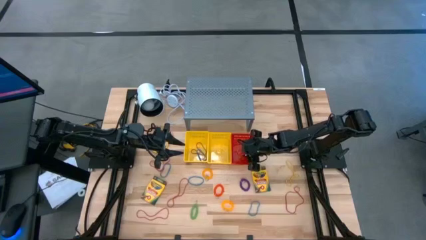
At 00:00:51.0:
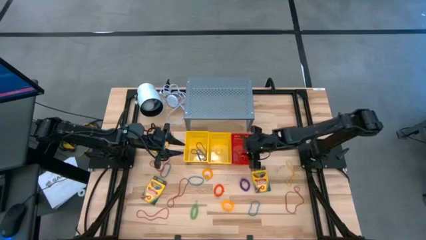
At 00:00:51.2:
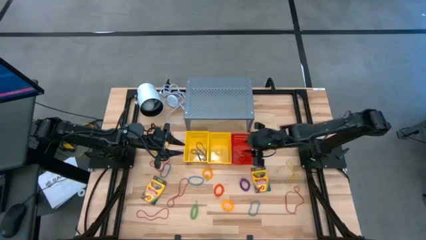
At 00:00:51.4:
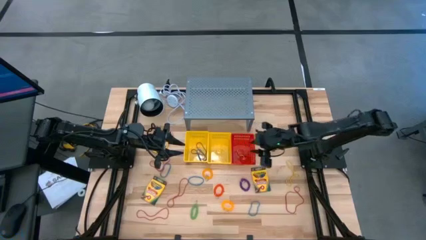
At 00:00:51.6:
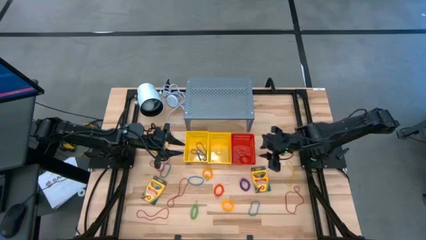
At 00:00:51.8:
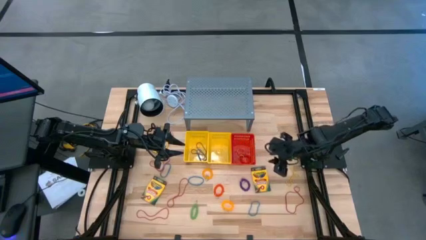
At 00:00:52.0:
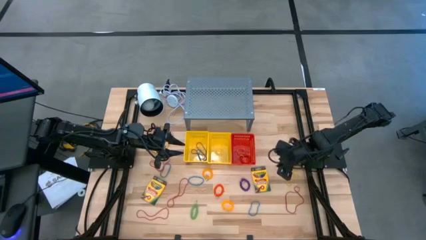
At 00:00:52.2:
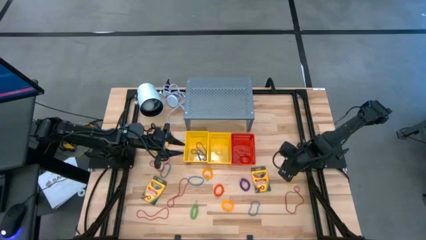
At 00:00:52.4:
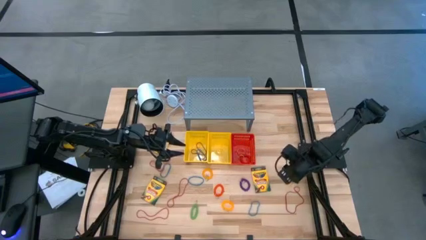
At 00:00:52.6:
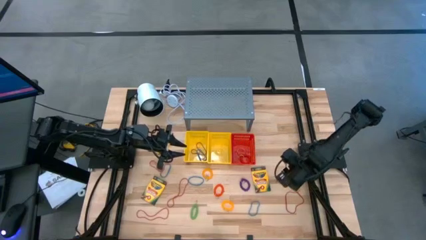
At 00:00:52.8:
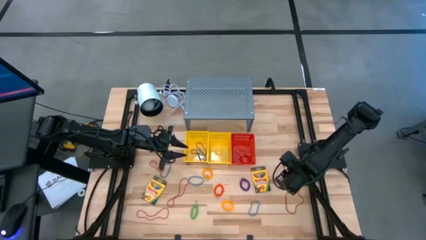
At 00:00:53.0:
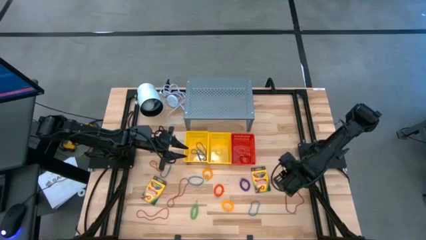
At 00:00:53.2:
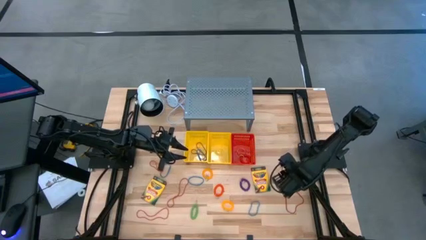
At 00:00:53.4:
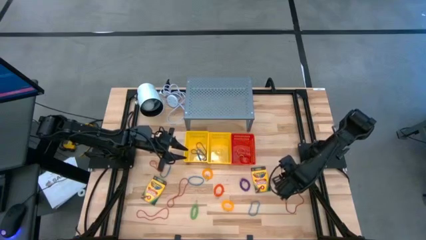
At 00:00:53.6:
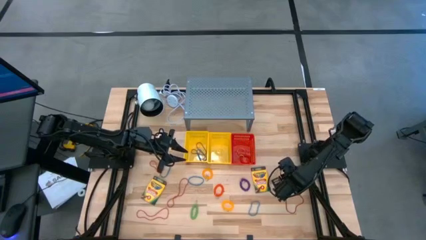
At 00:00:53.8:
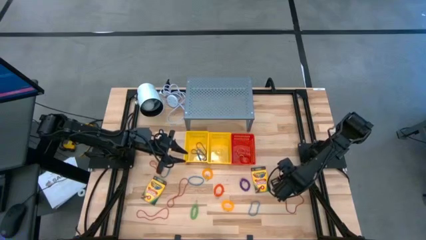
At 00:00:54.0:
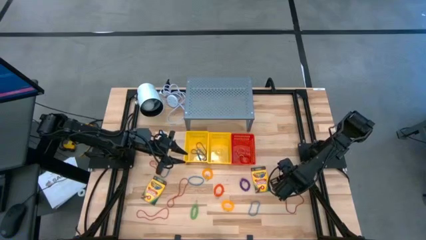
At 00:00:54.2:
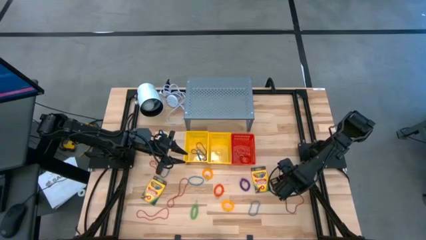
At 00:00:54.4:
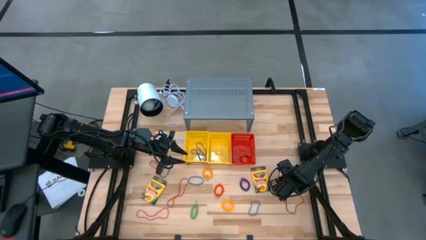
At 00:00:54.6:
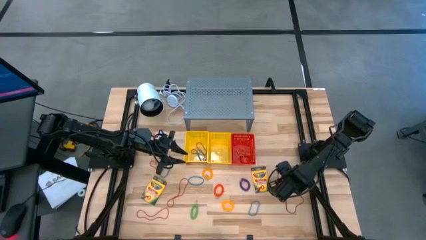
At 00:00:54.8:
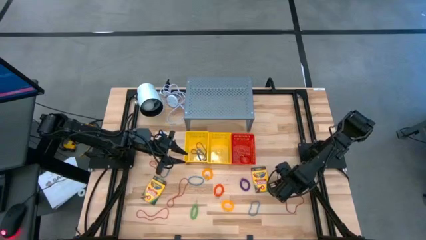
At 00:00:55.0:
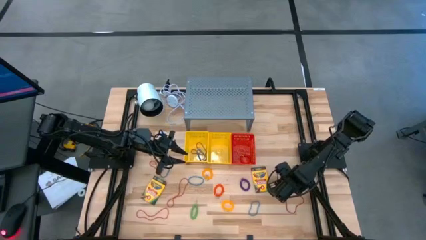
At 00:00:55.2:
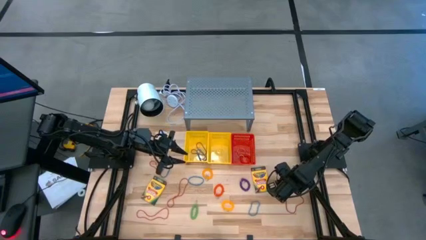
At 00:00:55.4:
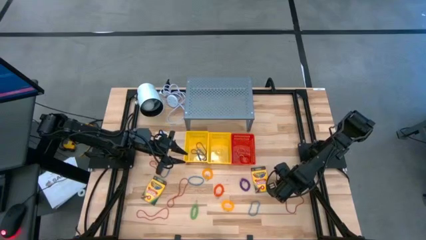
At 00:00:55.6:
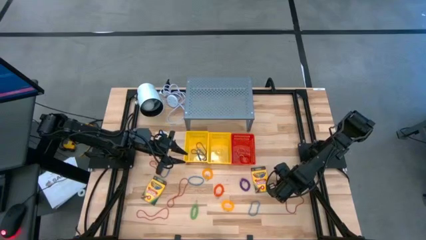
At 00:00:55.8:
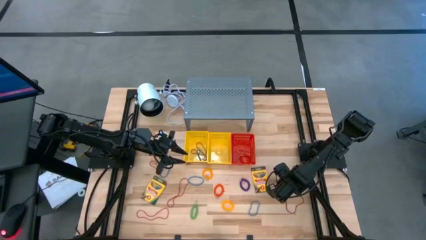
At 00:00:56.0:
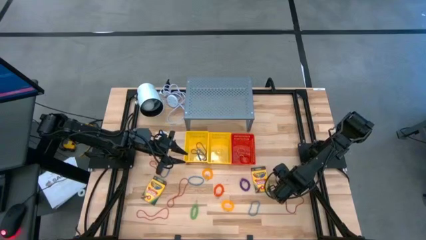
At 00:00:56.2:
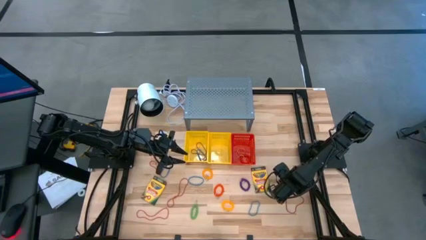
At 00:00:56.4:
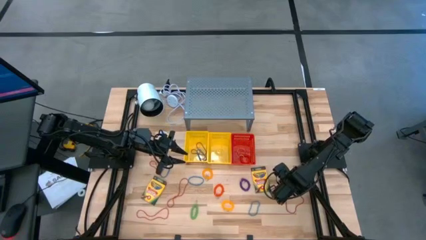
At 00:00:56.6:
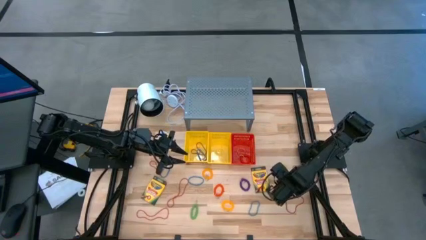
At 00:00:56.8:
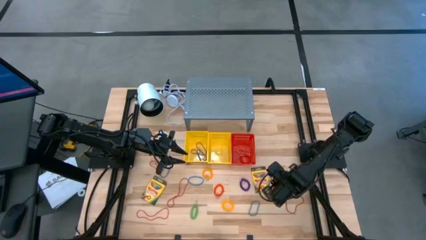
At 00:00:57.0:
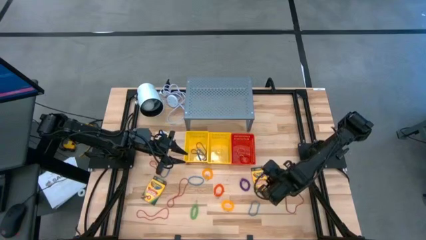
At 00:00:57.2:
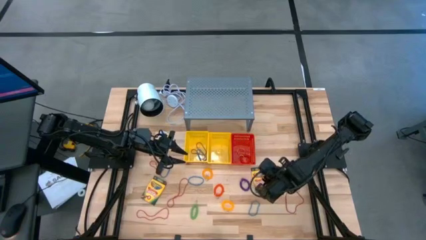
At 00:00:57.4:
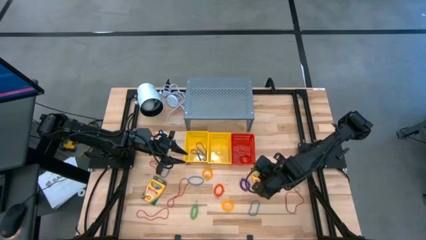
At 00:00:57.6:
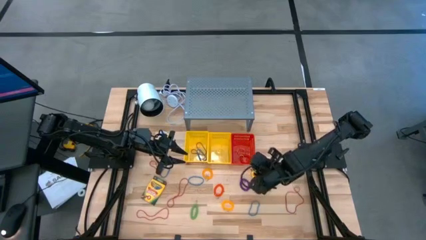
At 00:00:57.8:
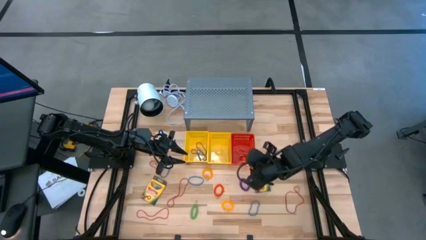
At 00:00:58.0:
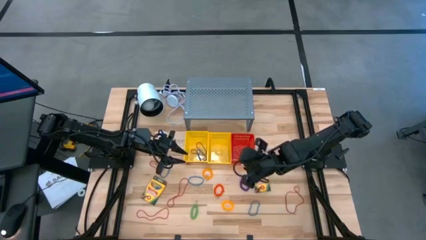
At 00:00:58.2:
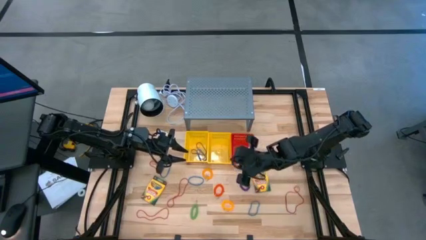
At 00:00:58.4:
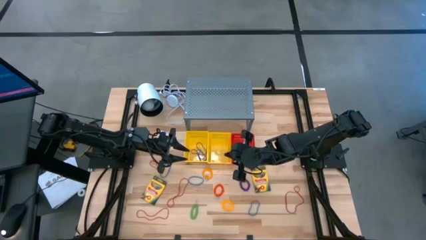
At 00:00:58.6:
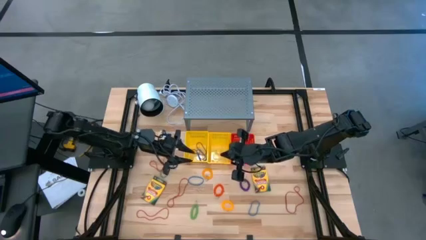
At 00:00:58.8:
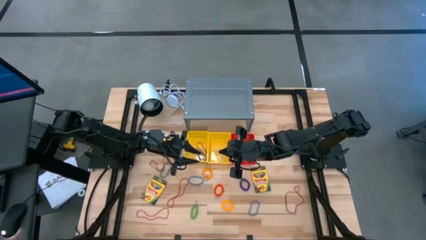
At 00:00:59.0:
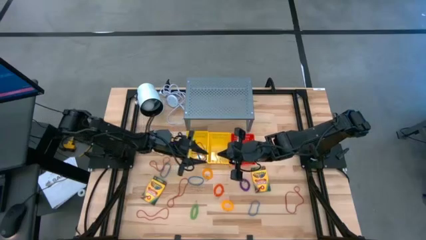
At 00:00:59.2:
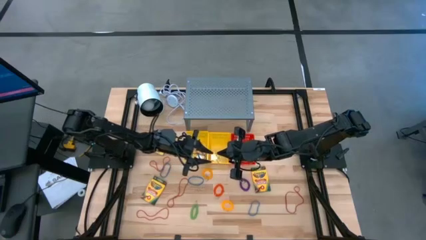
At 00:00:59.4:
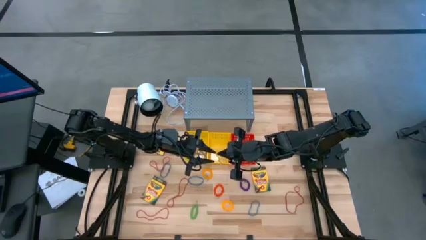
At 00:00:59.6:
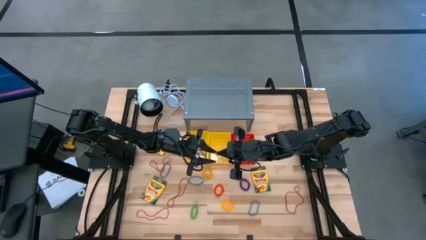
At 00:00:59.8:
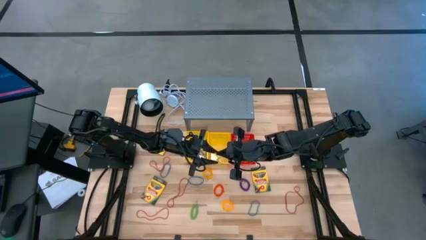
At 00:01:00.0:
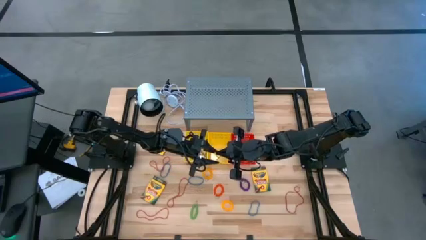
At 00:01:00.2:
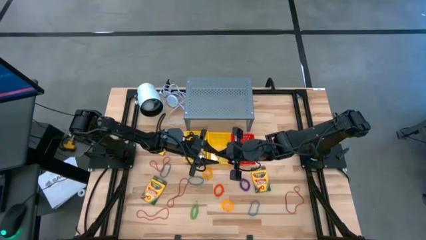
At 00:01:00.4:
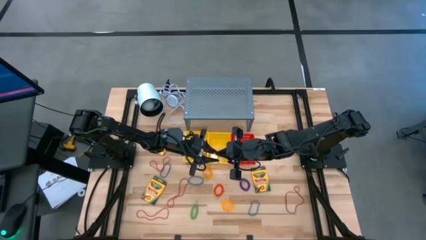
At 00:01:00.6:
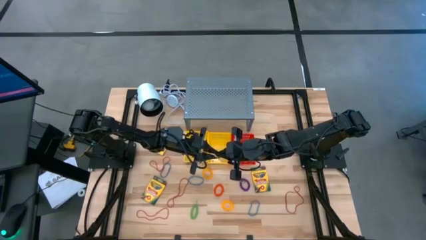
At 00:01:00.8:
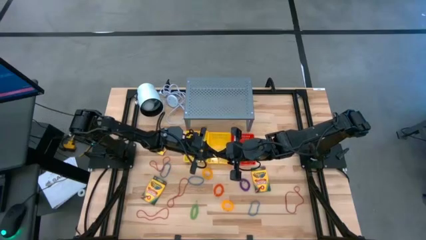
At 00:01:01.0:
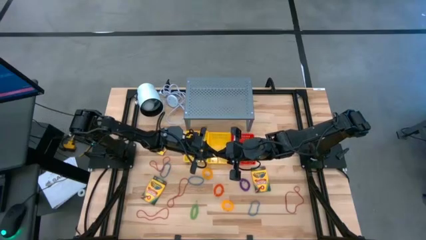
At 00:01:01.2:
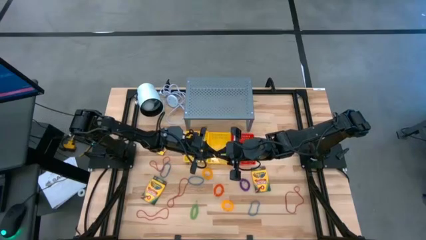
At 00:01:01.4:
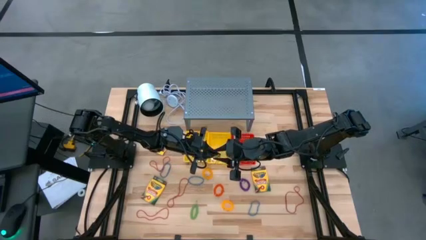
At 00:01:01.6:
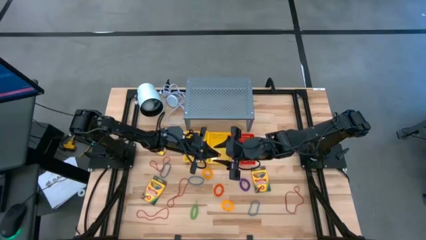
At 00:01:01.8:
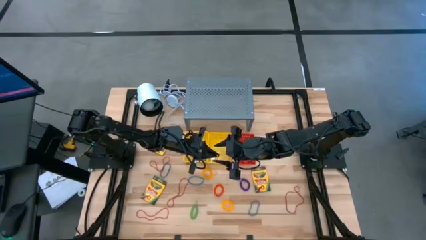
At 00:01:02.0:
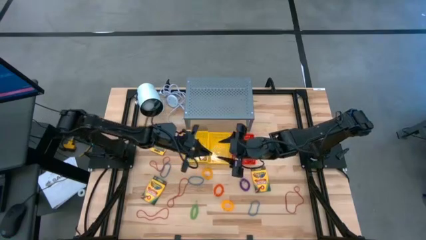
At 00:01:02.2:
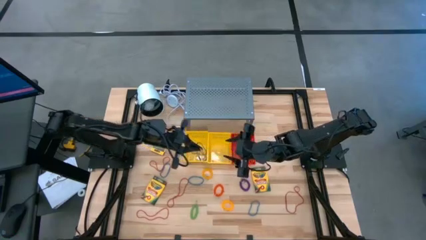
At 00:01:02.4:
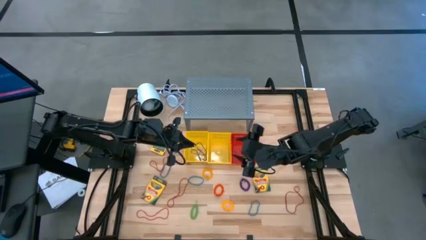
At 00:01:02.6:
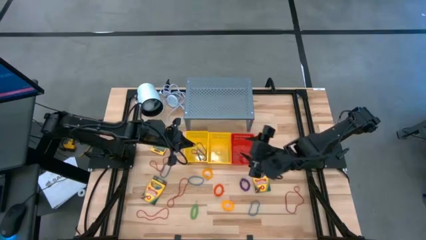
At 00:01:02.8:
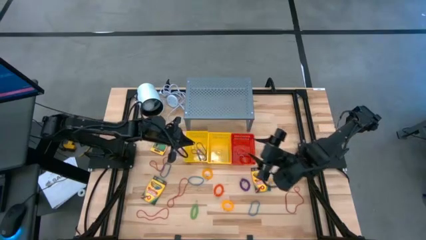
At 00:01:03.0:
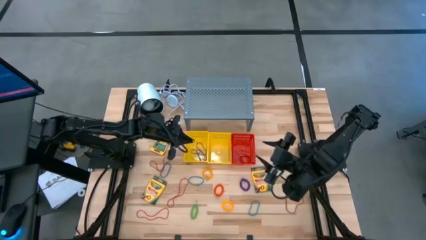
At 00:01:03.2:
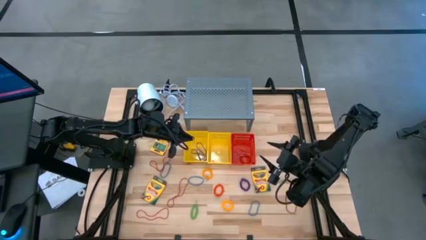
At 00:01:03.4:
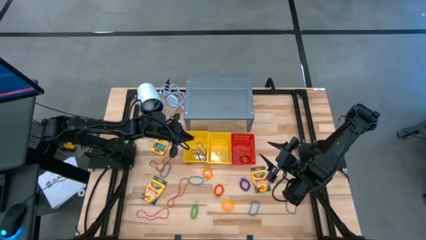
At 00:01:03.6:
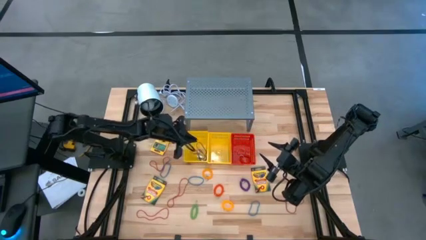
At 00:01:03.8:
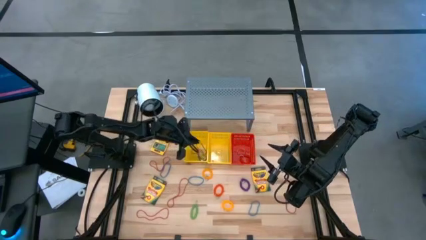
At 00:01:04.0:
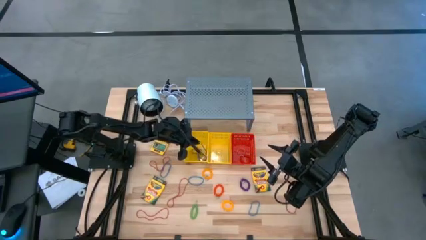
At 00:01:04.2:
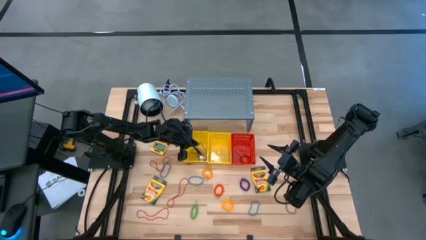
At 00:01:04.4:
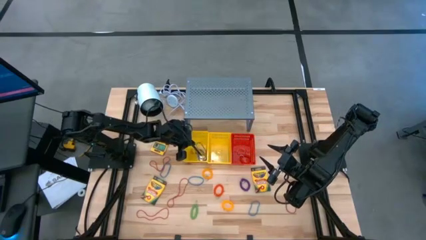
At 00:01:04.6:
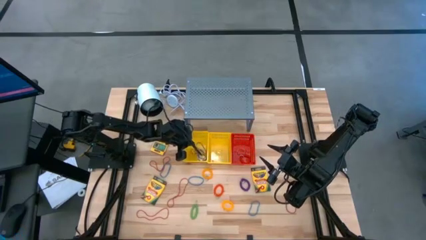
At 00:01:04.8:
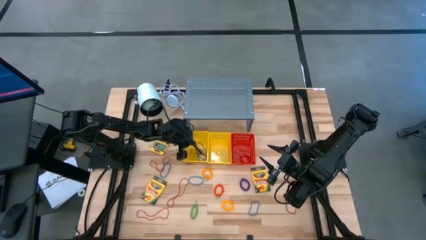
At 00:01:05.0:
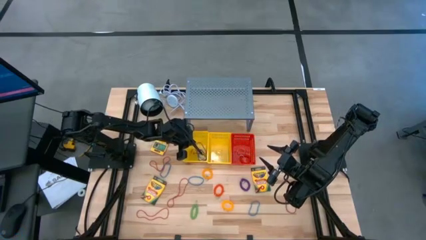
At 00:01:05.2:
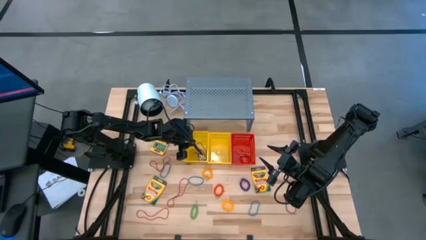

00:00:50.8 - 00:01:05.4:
Task: Pick & Place Office Desk Supplies
Put the yellow rubber band into the left yellow basket
